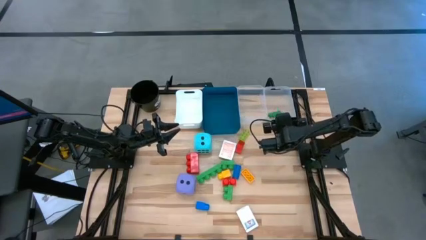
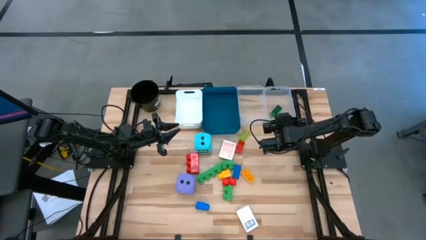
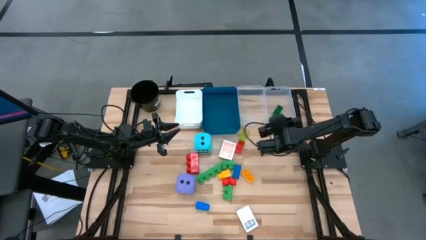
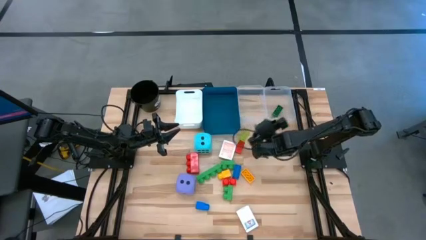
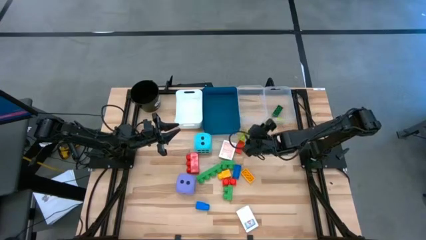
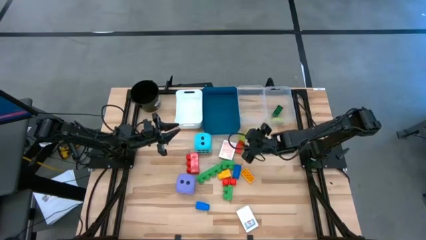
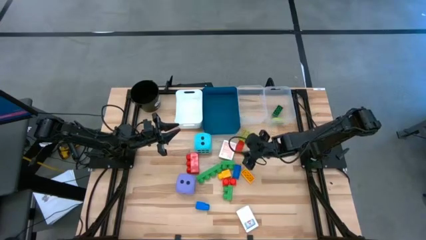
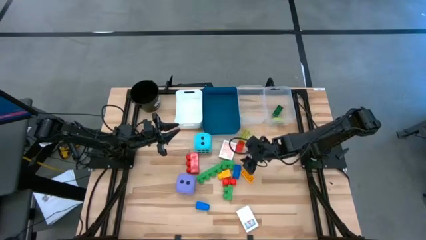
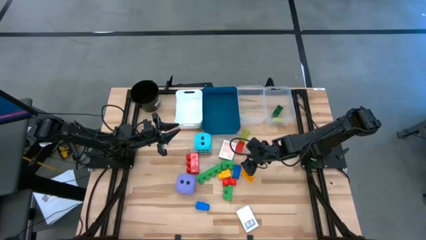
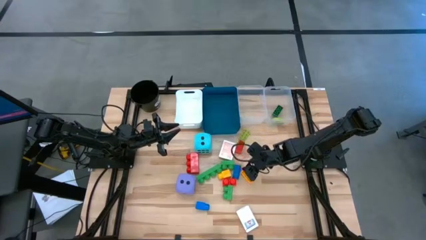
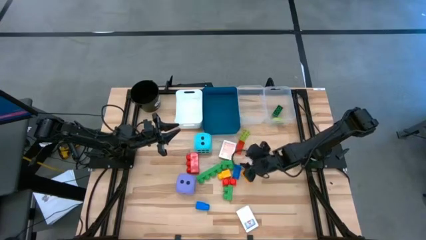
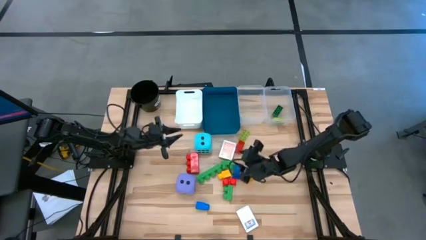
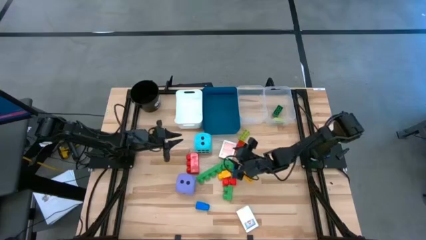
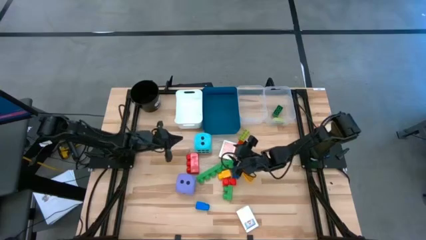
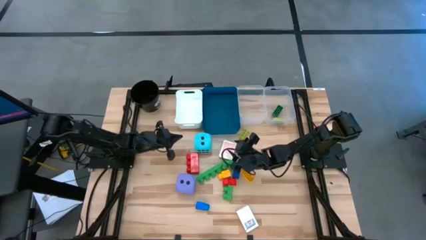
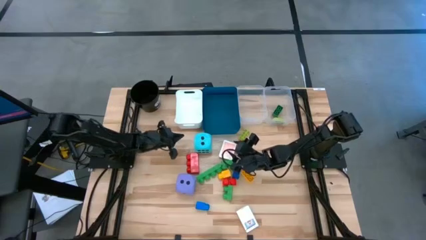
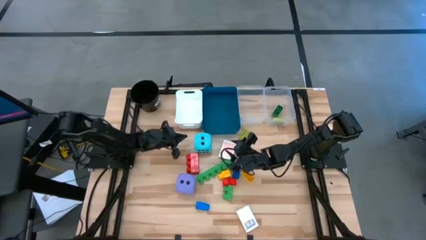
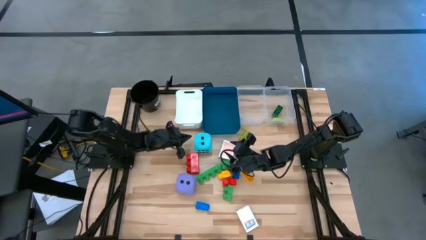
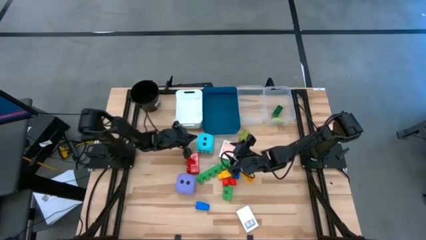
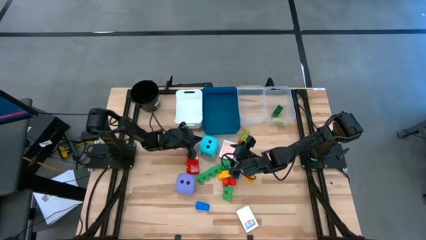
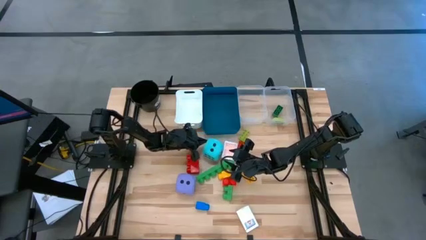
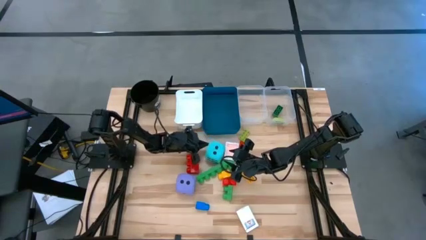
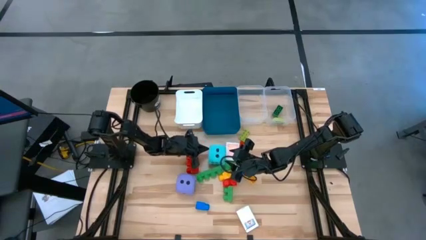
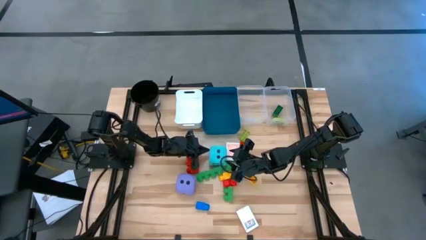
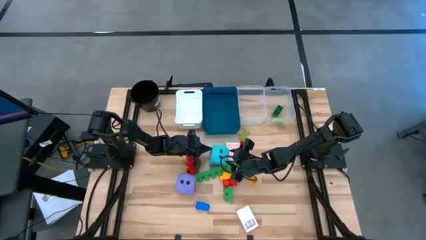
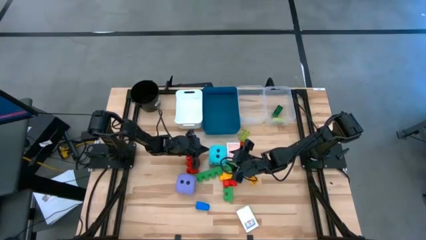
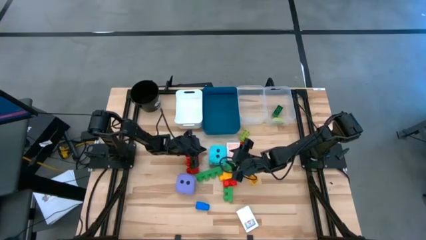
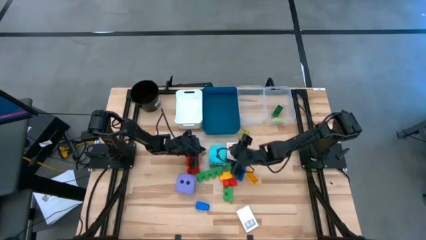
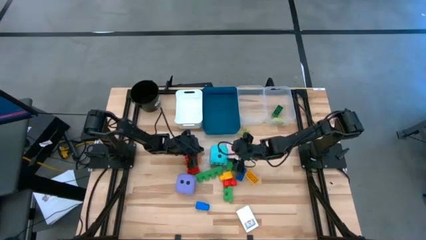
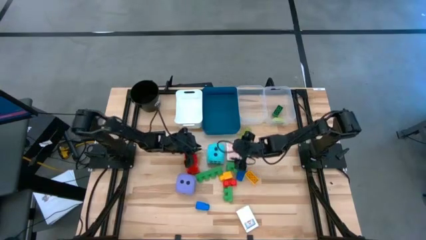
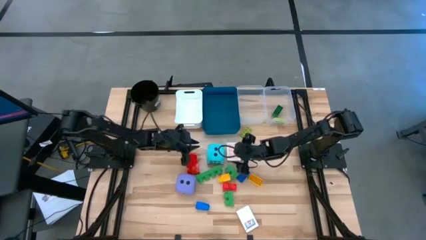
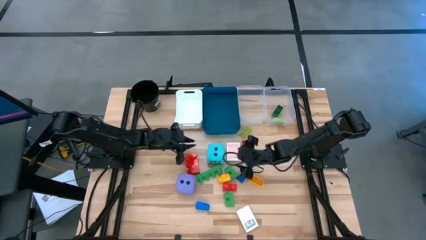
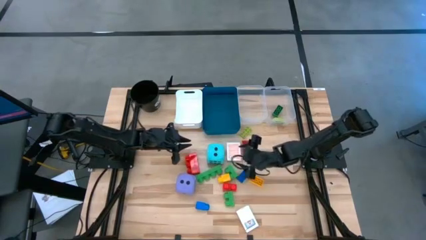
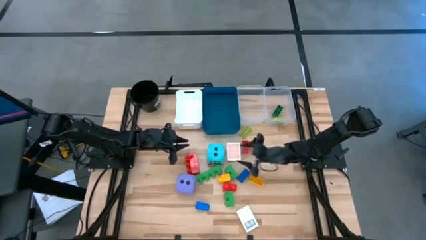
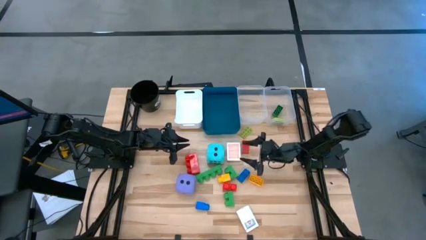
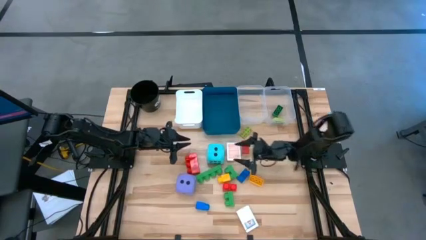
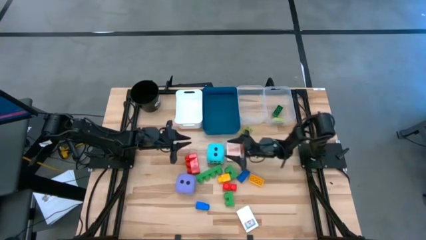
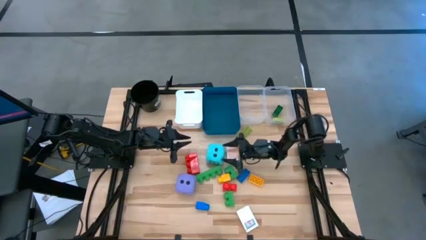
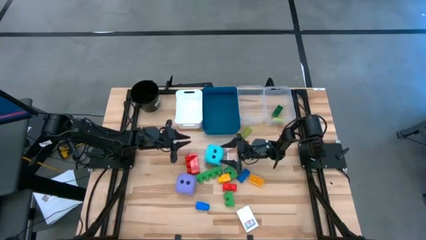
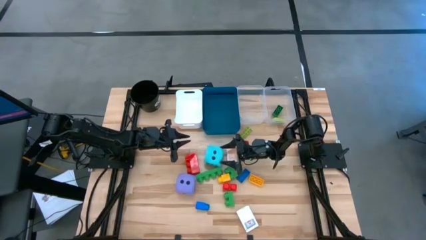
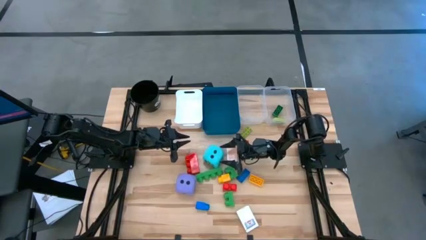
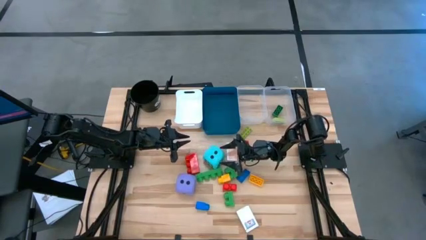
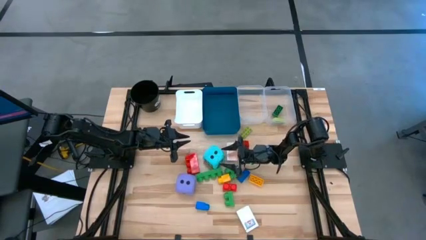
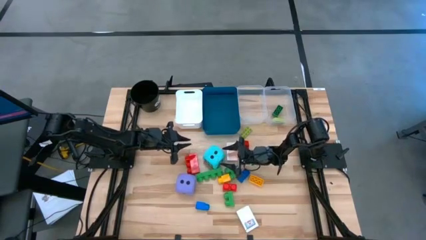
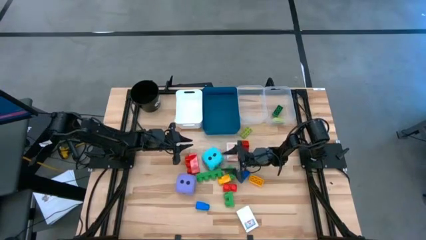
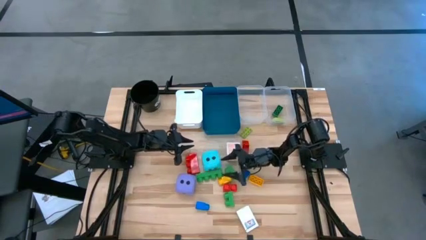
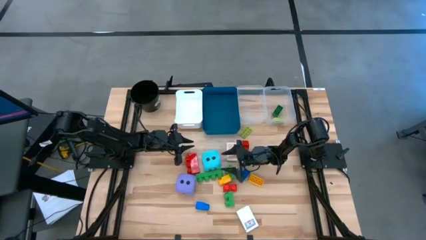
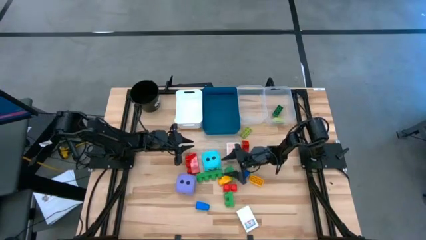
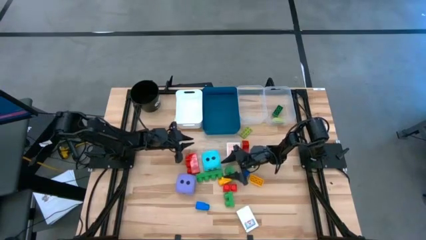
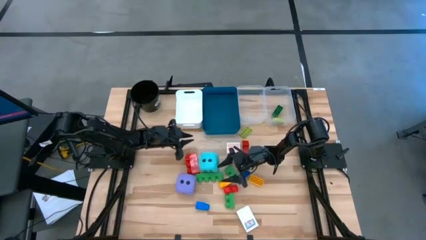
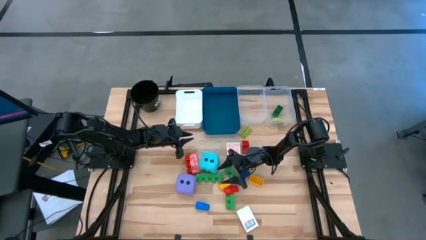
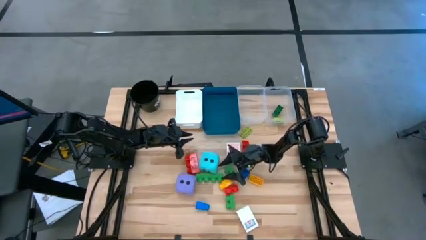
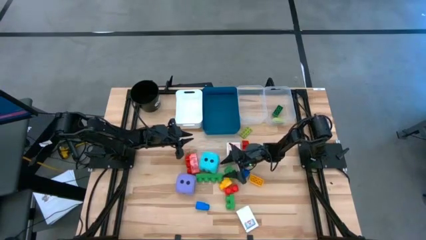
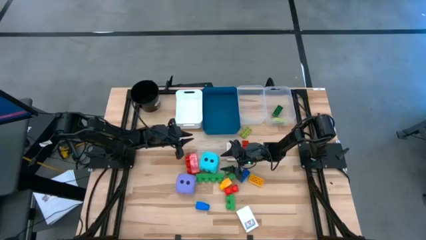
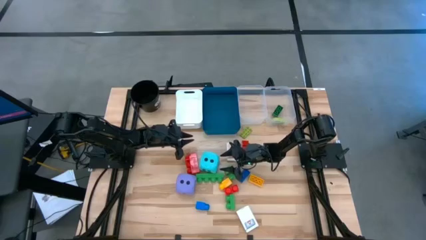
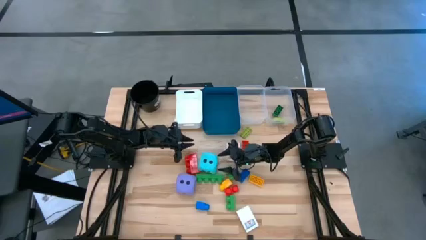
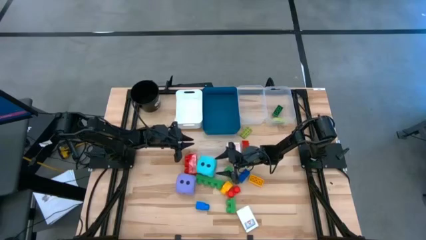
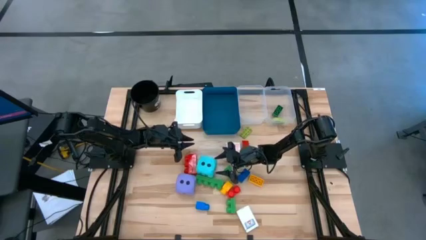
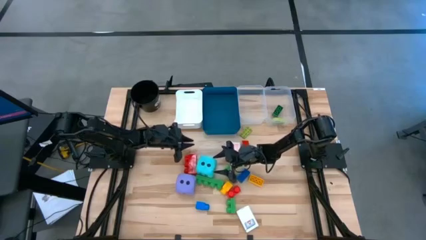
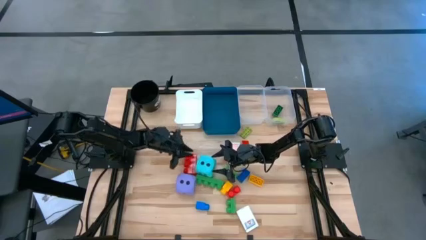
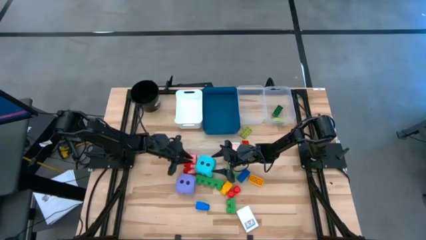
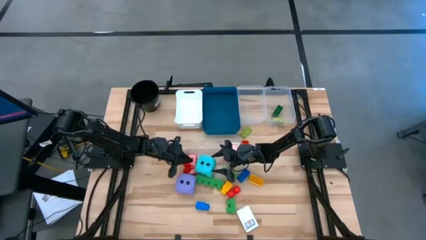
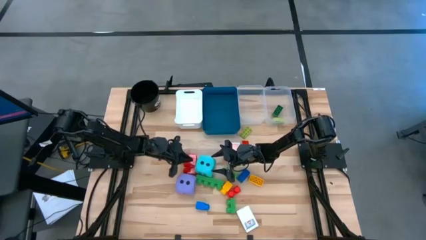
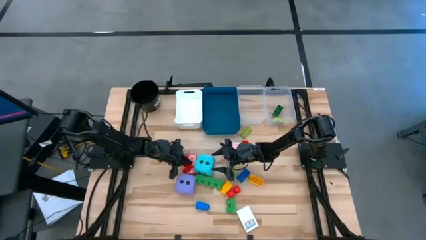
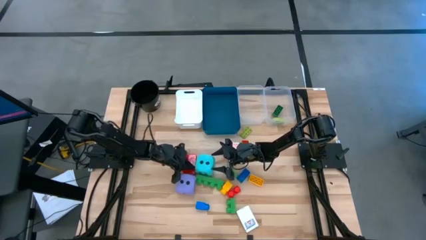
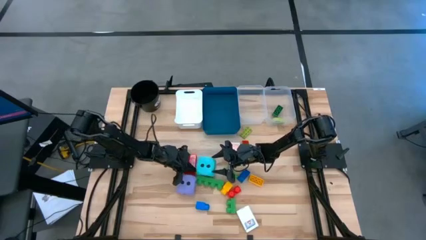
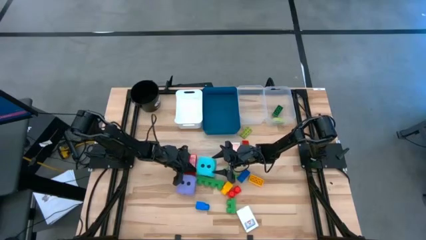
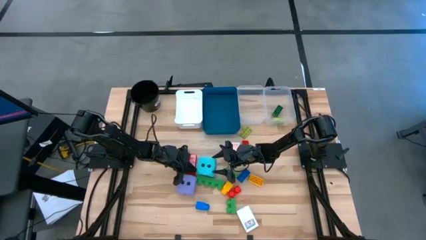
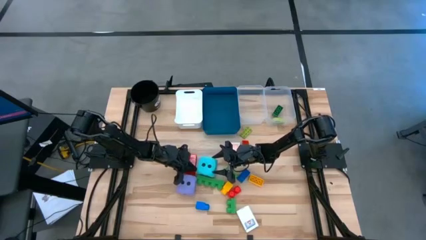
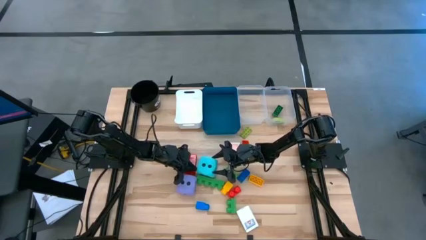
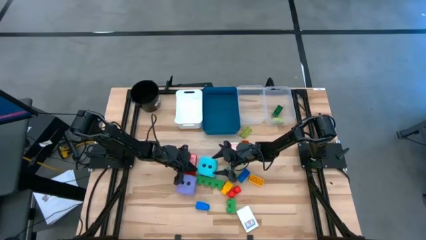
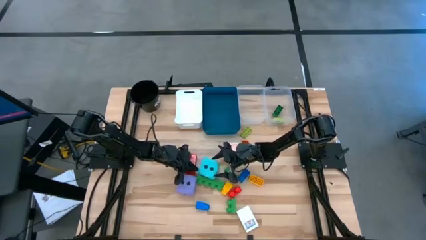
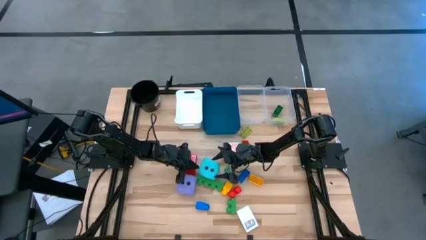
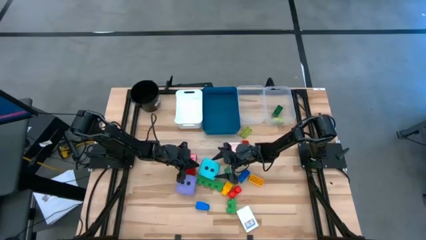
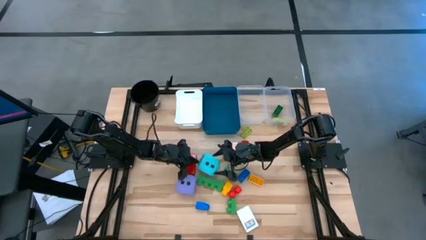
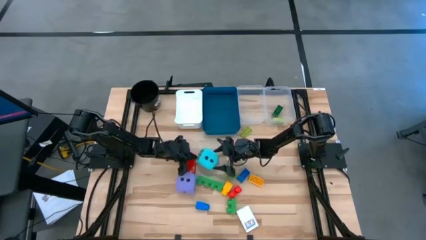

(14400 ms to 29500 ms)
Task: Pick & Place Toys
Put the large blue dice into the blue bin
